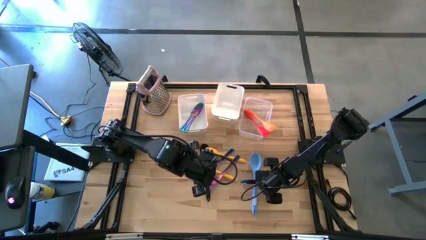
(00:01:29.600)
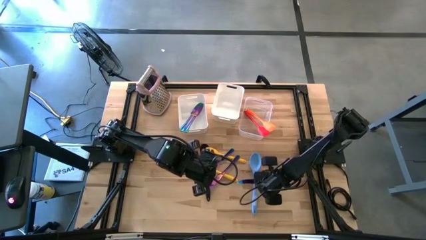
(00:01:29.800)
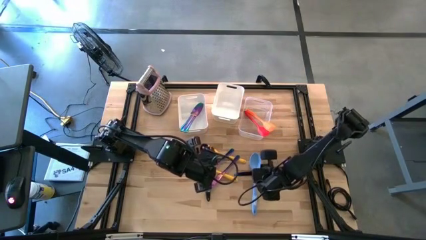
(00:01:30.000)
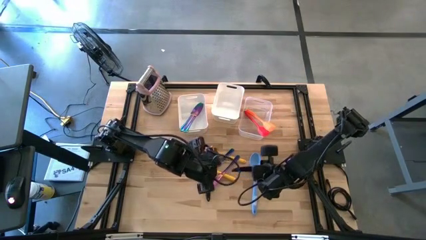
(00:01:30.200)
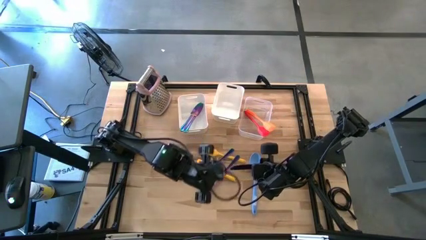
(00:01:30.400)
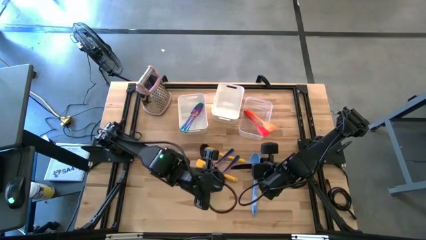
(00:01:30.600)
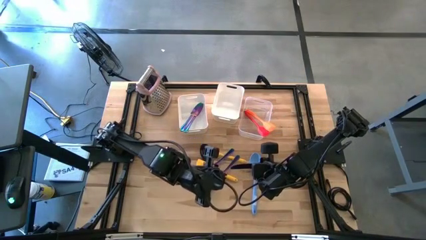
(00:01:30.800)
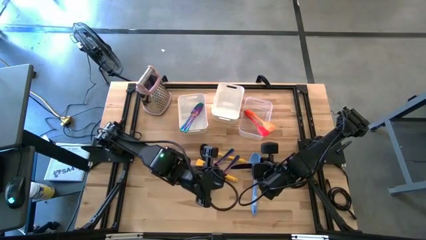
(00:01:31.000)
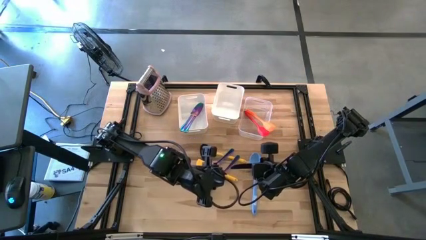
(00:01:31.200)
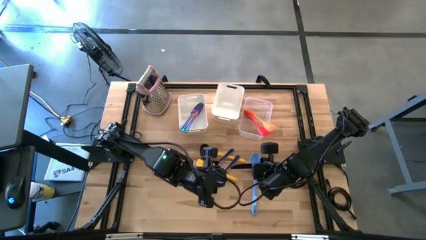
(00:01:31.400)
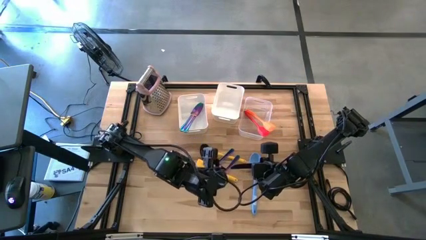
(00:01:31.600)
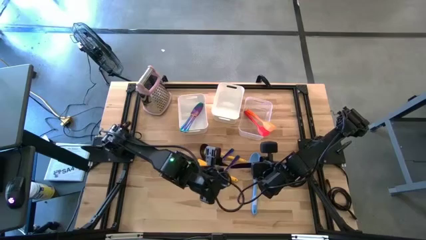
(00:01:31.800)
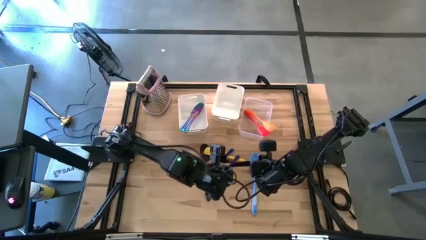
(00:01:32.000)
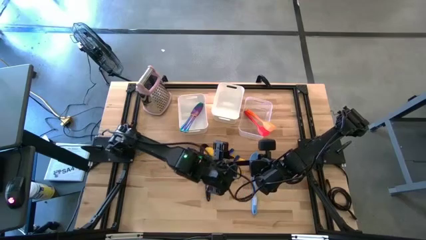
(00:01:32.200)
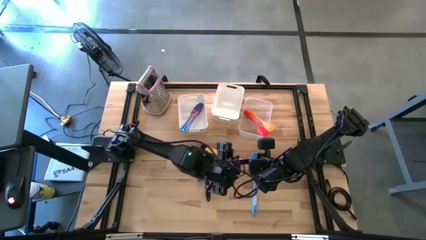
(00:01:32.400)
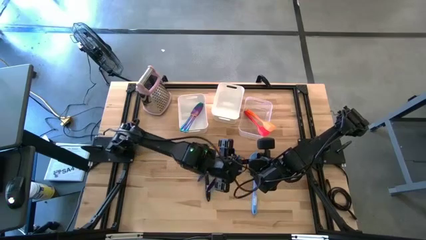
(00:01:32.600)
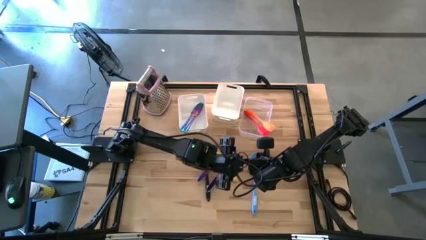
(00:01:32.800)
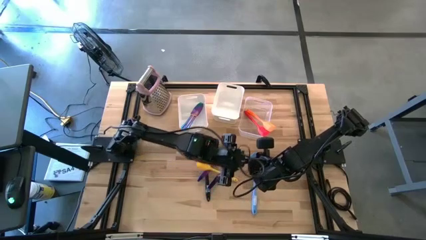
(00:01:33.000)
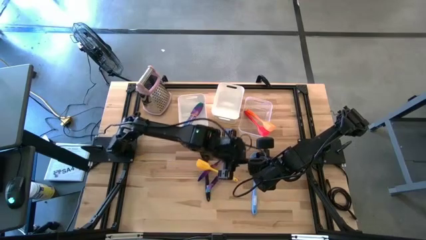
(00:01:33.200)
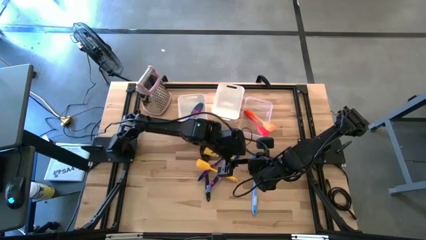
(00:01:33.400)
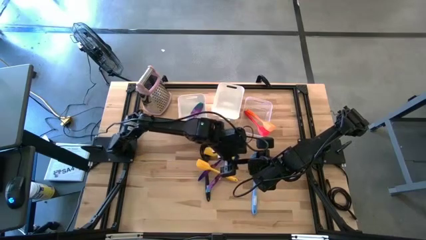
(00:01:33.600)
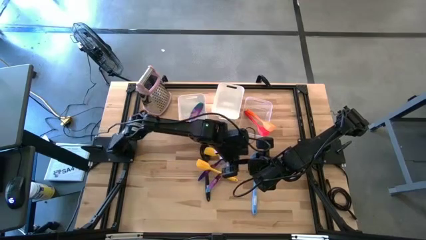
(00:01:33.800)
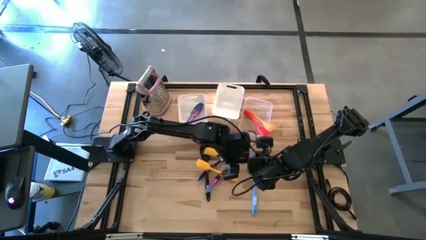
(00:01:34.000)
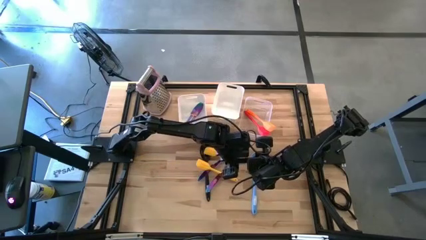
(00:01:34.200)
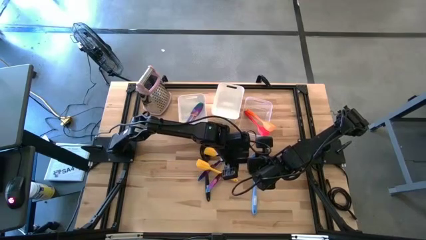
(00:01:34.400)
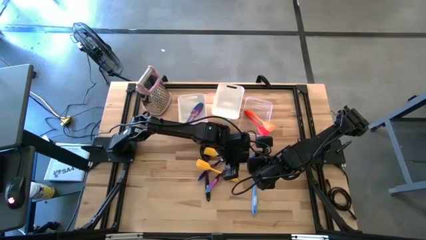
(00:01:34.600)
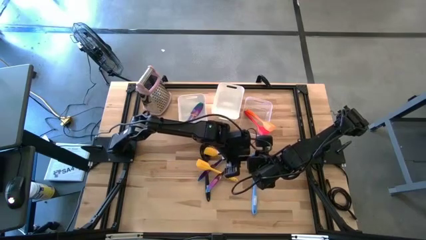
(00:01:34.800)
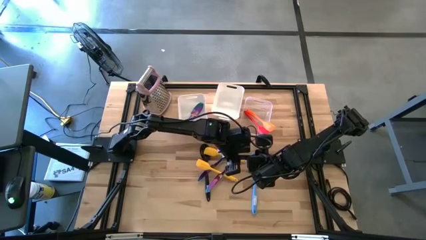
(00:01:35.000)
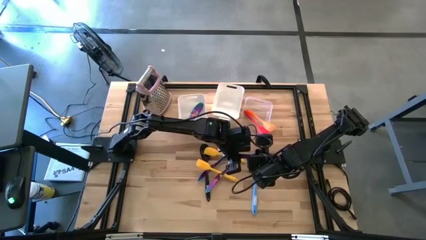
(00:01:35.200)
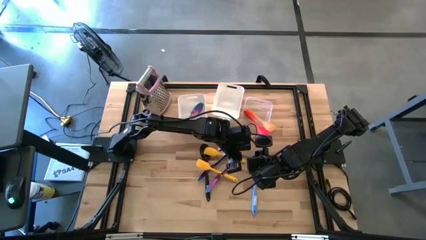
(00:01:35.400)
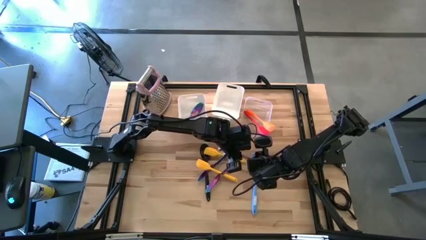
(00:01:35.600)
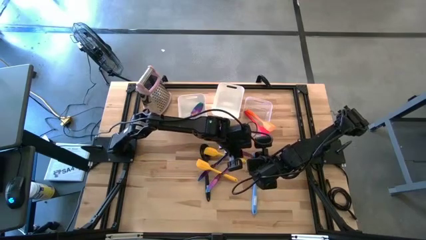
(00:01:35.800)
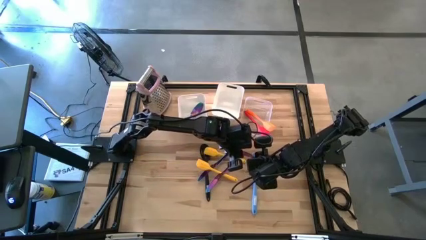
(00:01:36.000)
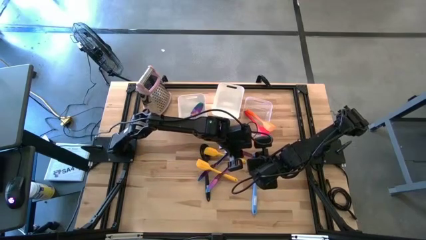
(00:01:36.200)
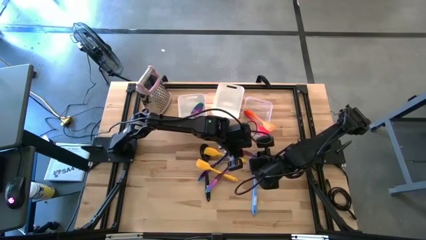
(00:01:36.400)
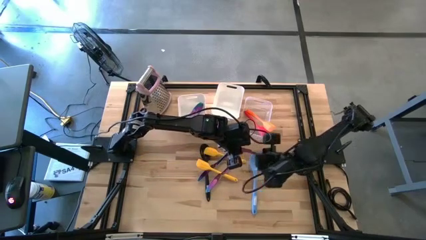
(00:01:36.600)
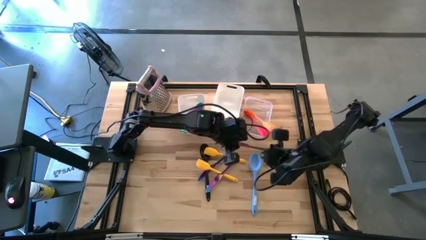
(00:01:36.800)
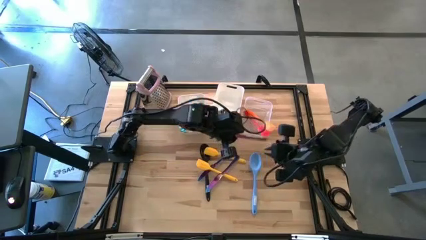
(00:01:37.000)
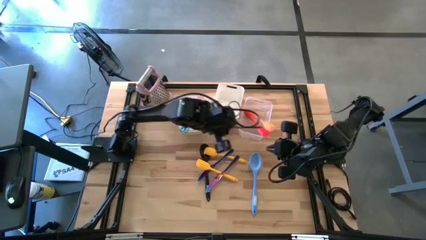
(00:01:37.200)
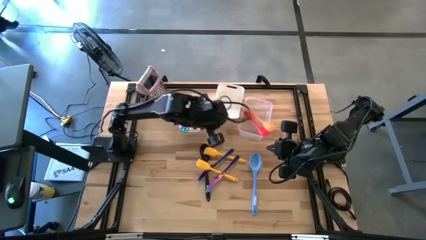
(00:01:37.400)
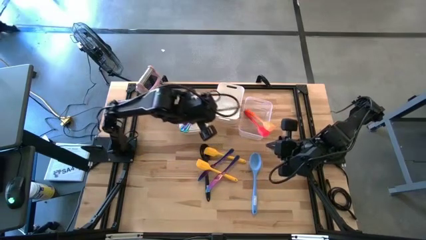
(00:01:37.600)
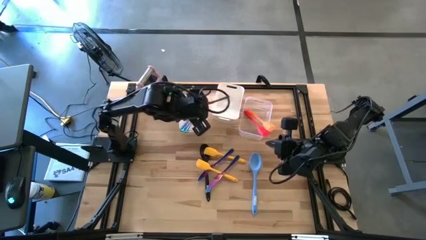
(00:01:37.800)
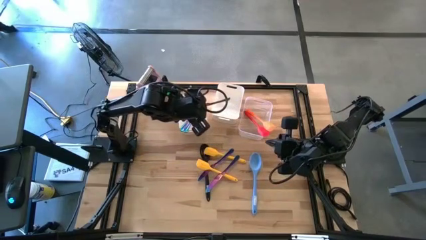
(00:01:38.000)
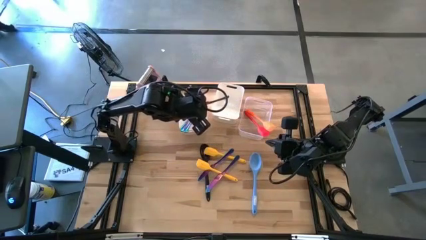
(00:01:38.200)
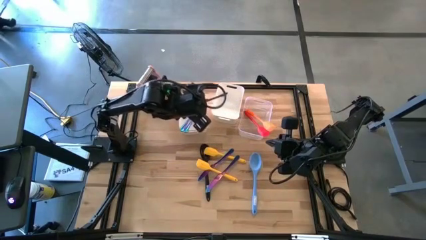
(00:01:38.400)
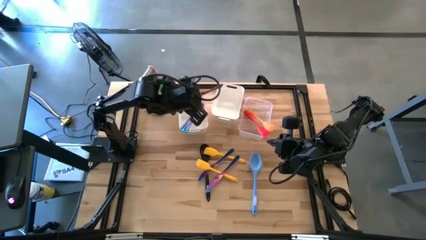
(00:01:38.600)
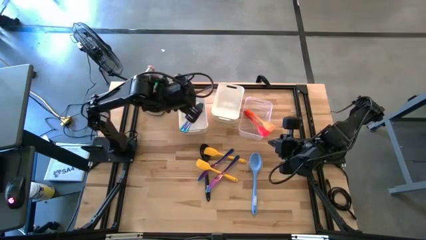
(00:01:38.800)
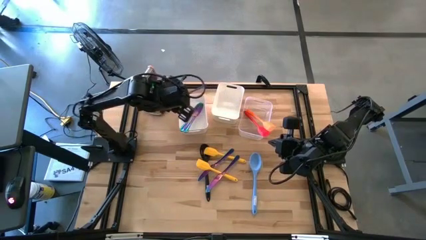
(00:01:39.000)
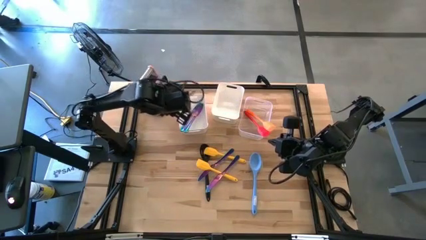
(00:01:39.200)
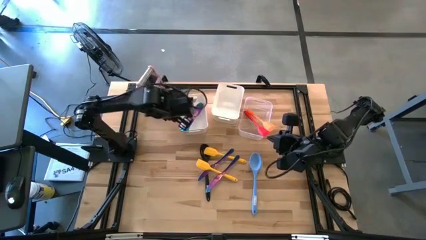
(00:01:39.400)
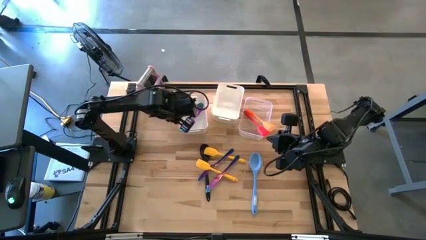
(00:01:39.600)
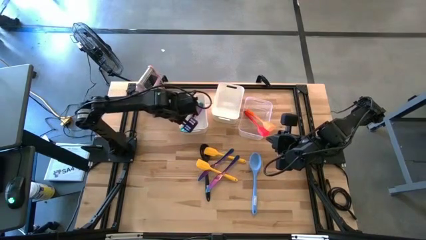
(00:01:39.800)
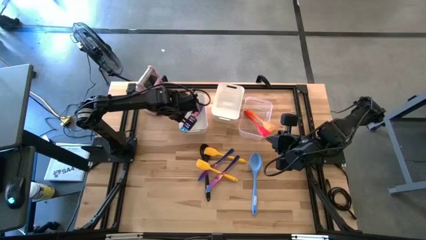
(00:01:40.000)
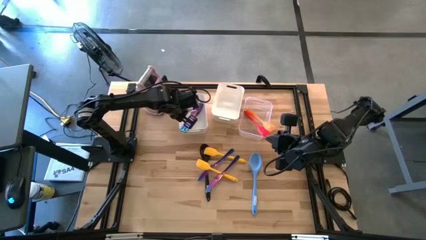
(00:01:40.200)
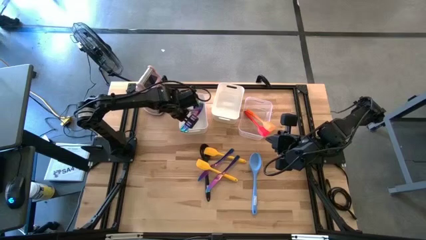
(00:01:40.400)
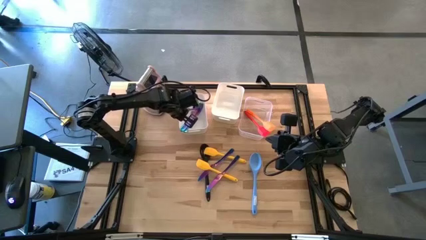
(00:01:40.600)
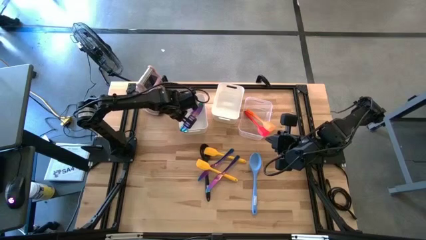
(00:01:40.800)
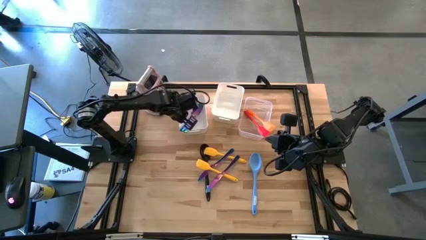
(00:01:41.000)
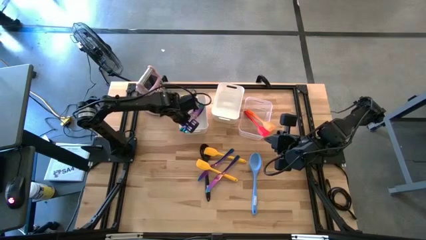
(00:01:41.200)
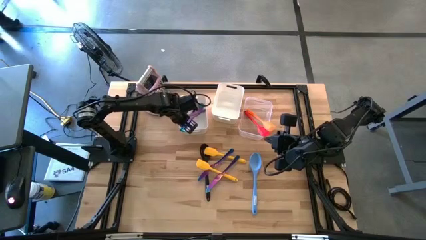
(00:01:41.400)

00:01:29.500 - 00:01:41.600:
Task: Pick & Place Kitchen Items
Put the violet table knife into the left white bin
